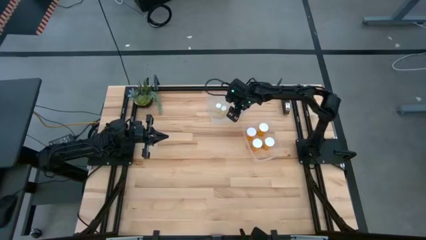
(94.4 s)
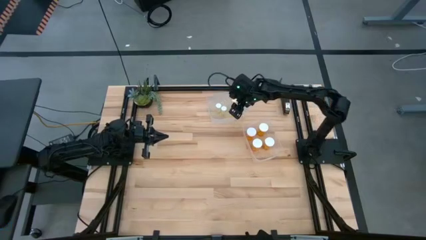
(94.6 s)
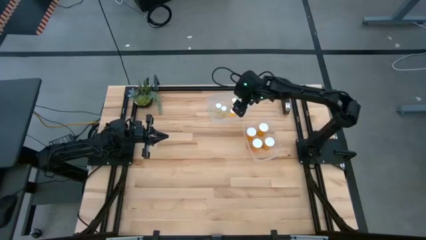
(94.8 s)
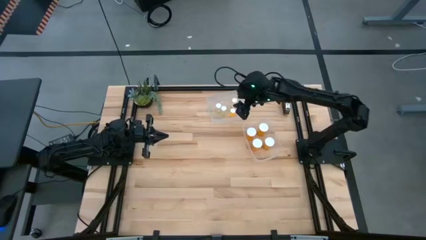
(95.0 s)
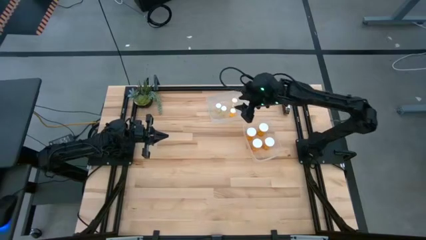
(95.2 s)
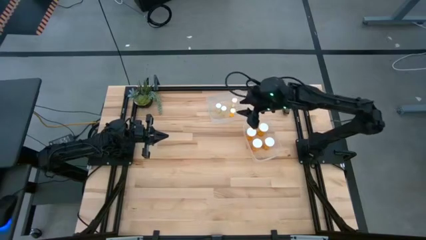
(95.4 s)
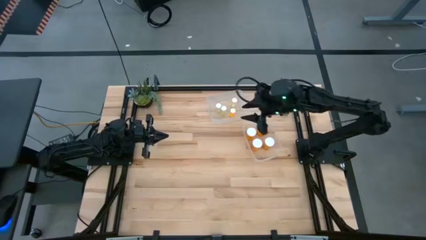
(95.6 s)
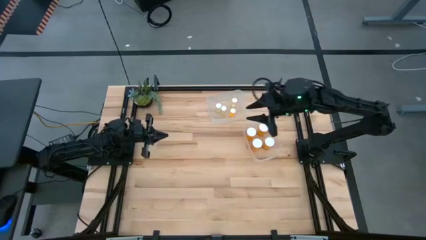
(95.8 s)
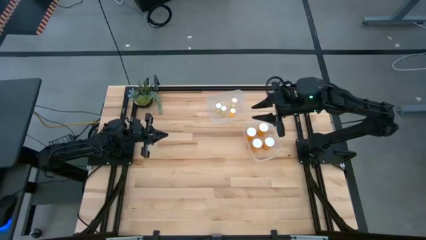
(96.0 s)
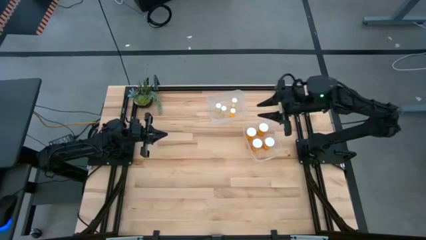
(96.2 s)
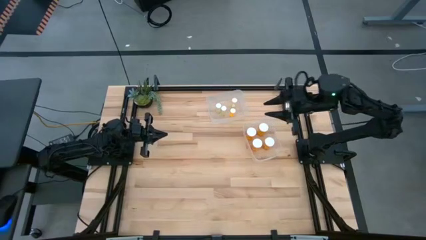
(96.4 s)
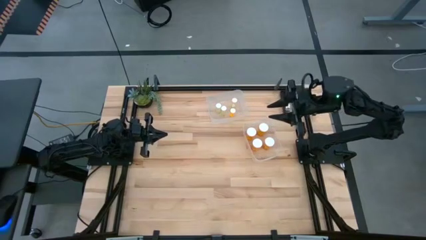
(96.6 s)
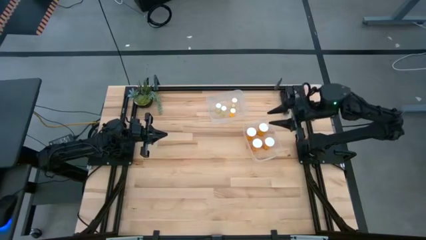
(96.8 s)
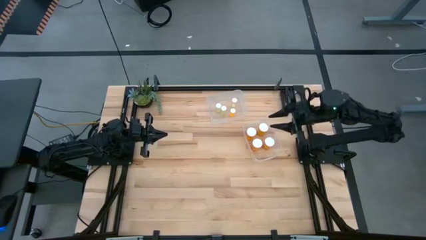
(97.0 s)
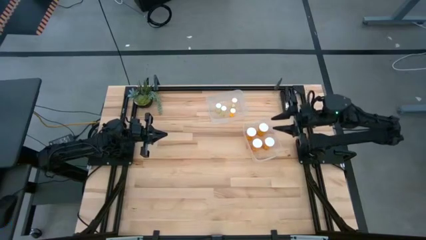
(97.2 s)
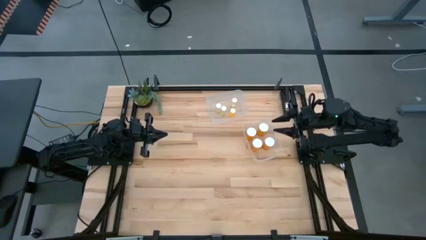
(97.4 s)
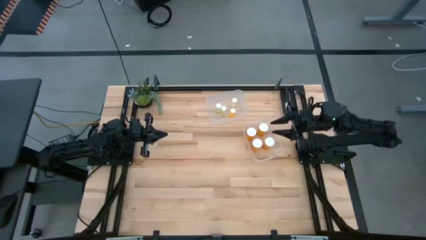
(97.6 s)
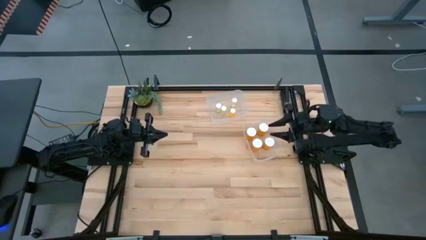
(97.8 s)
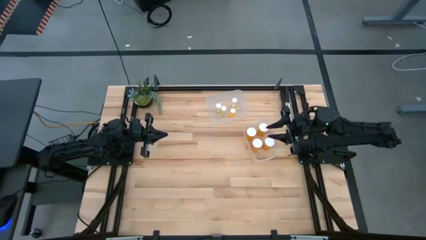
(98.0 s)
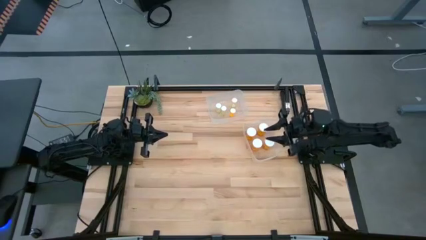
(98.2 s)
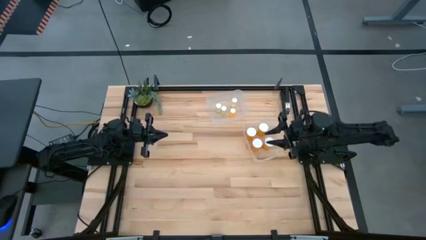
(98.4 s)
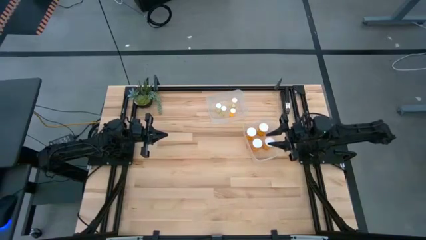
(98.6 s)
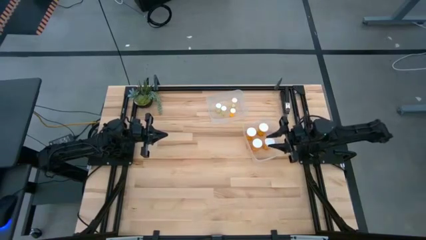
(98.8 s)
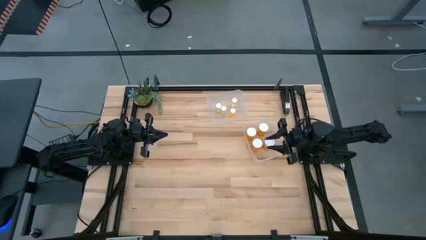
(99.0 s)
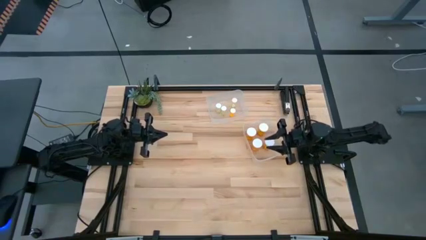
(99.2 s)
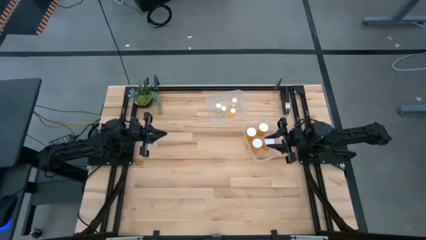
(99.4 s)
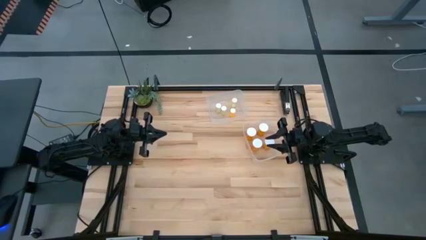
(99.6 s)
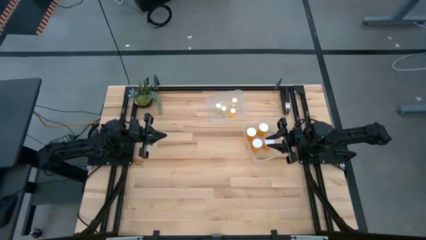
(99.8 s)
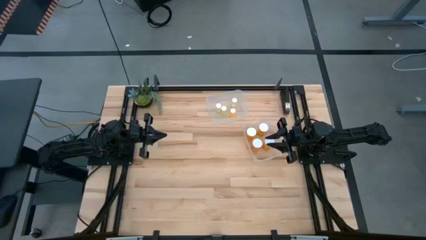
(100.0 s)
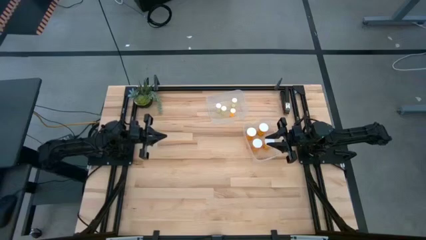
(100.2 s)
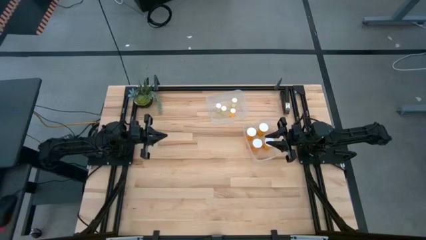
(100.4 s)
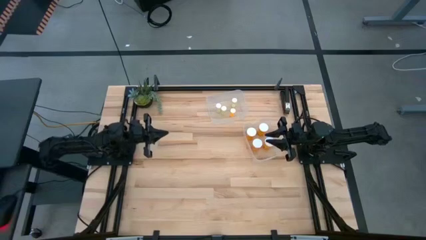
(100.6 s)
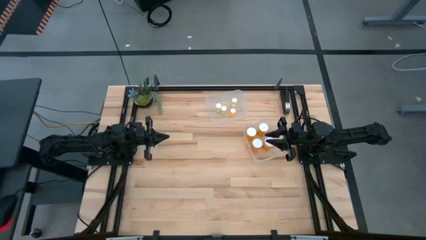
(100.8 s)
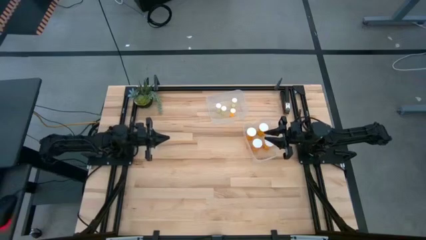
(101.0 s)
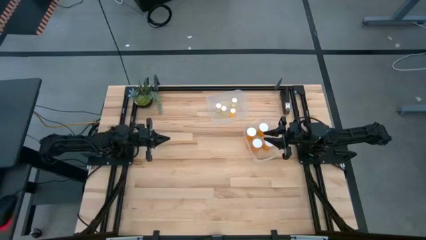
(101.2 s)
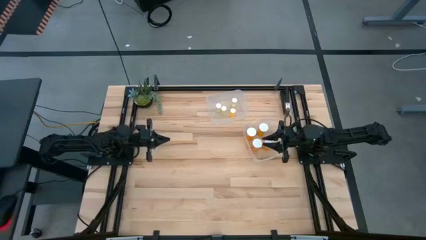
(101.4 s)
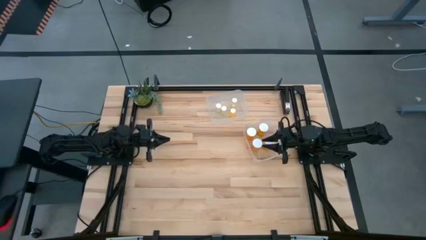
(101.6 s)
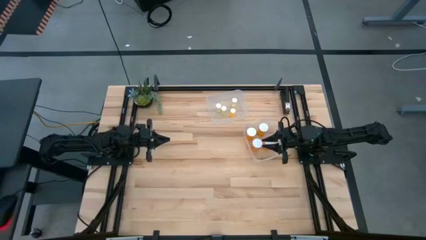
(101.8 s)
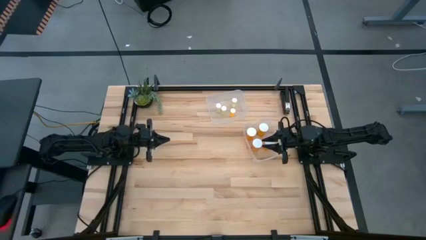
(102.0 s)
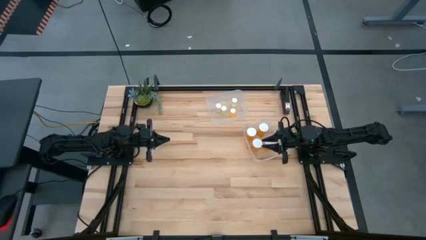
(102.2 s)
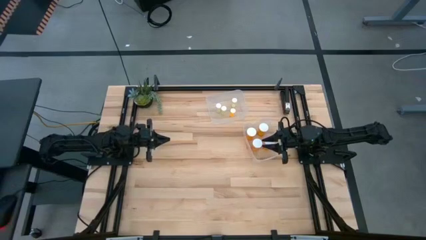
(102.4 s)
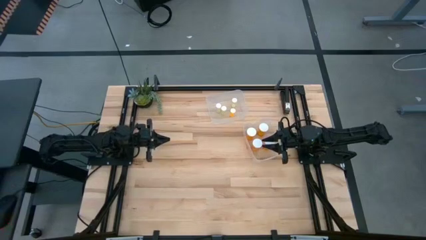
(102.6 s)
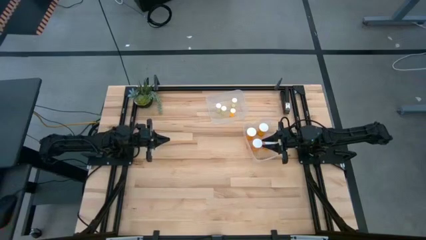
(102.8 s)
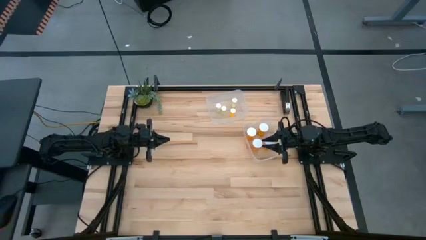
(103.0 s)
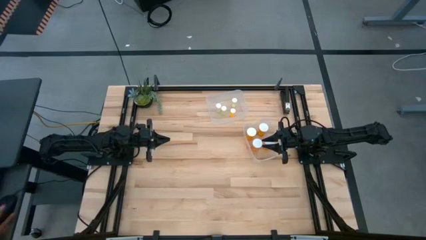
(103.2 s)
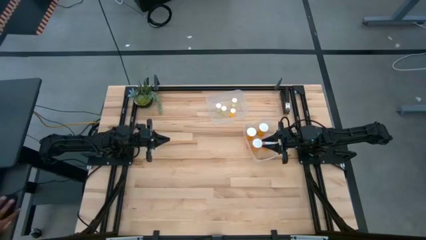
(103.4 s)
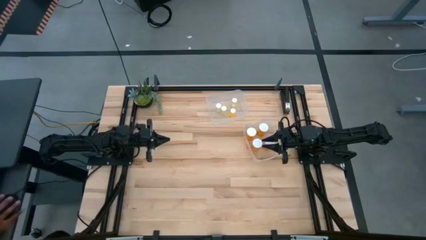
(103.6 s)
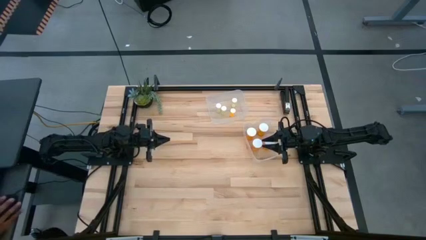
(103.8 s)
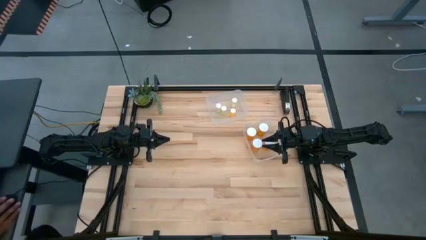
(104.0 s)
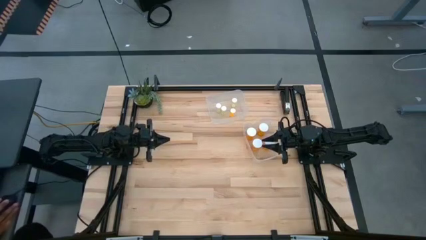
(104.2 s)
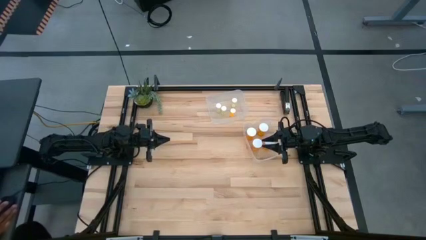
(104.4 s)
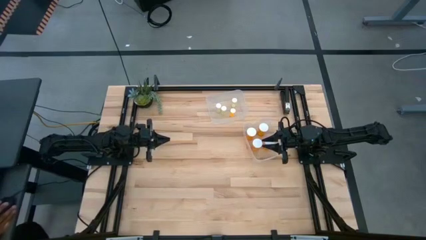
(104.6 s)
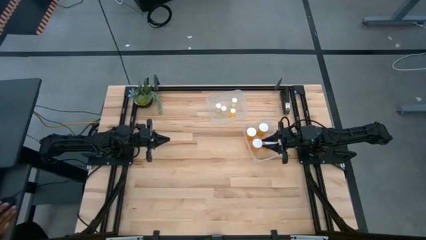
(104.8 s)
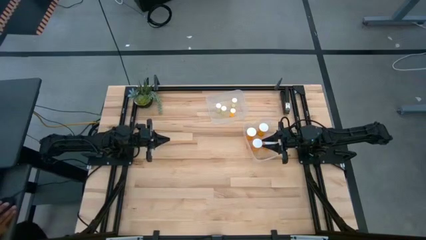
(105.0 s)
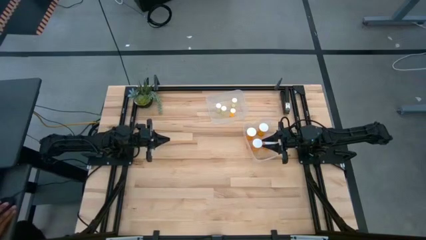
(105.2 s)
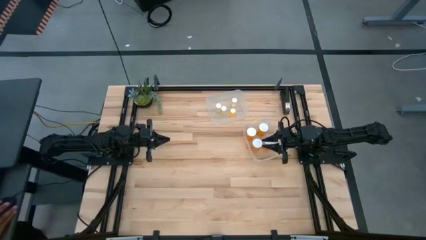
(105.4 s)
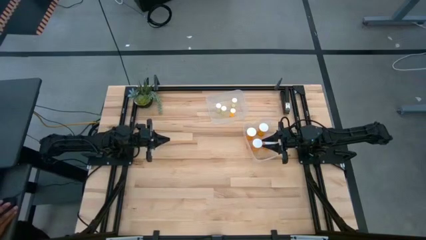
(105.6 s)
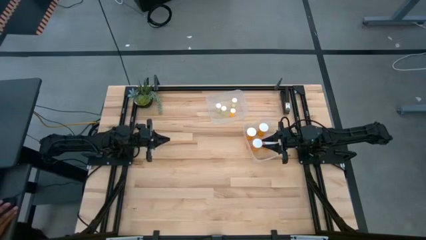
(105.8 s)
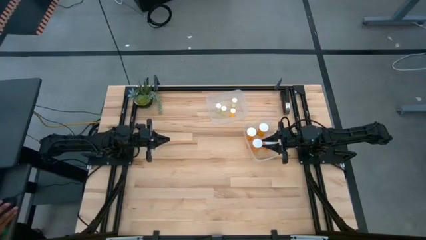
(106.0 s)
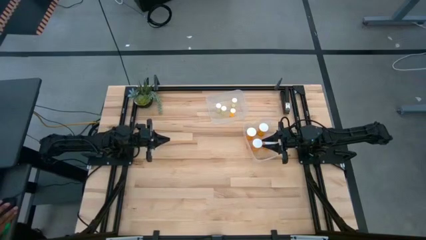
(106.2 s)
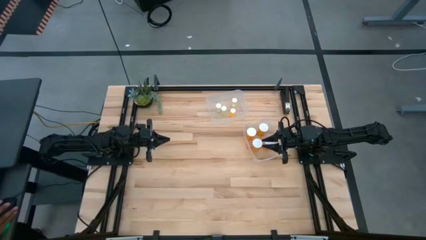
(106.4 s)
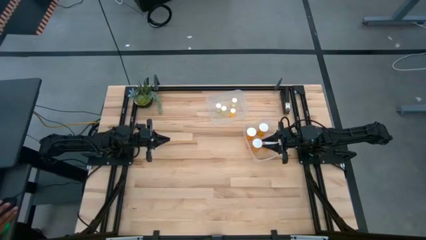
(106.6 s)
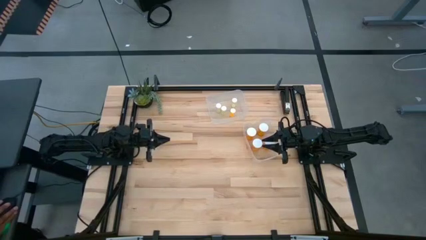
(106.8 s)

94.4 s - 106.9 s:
Task: Pick and place medicine bottles into bin by pill shape (circle, oval)
Return to Home Position

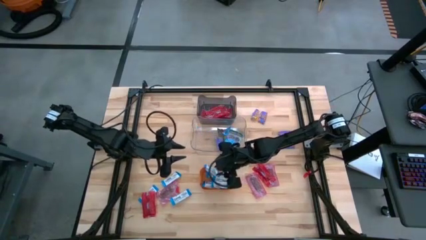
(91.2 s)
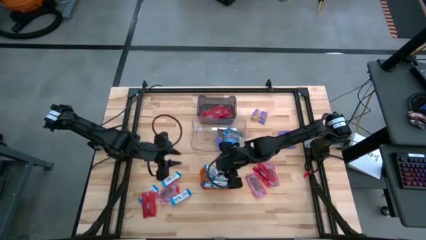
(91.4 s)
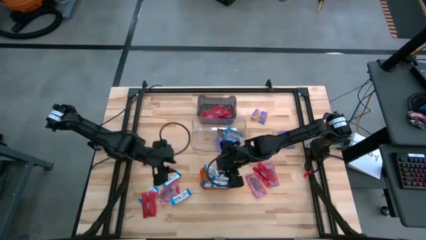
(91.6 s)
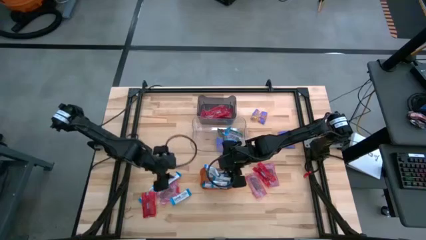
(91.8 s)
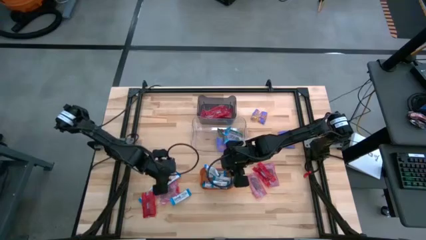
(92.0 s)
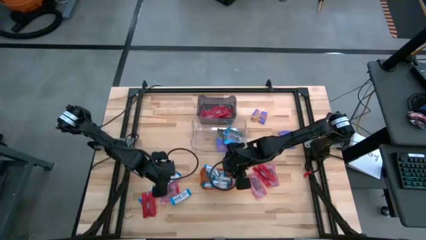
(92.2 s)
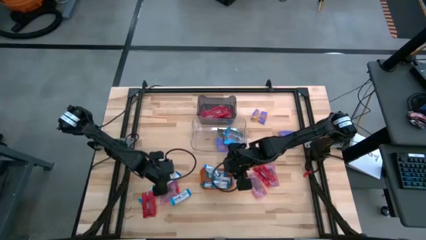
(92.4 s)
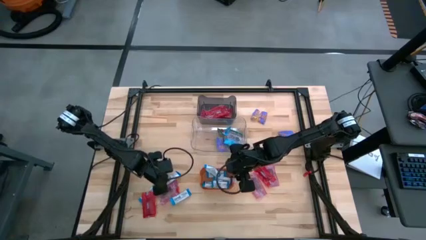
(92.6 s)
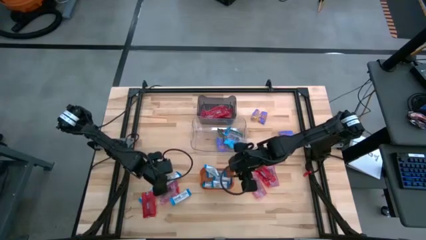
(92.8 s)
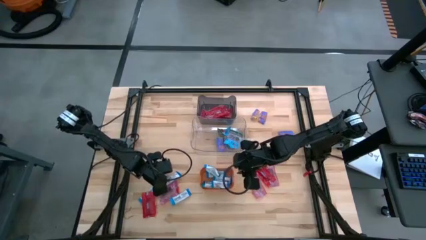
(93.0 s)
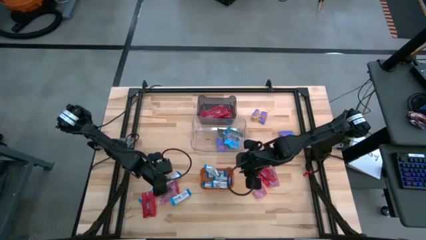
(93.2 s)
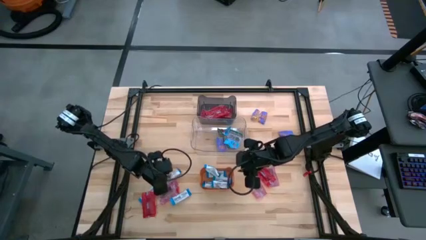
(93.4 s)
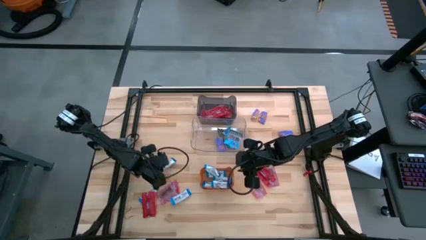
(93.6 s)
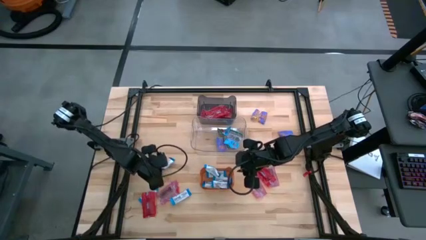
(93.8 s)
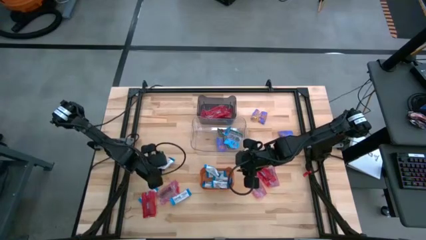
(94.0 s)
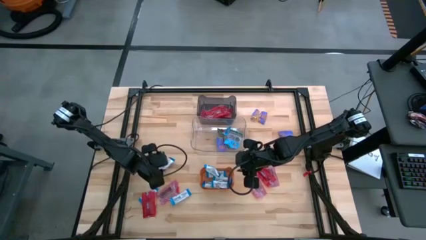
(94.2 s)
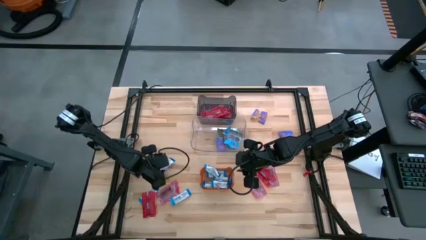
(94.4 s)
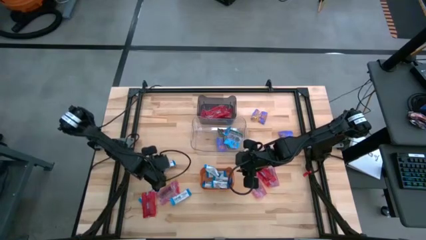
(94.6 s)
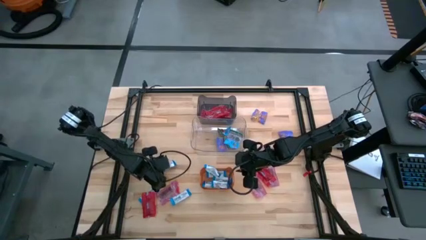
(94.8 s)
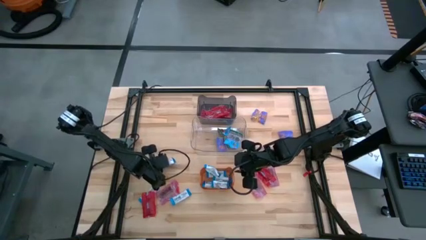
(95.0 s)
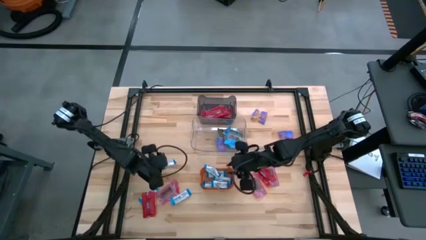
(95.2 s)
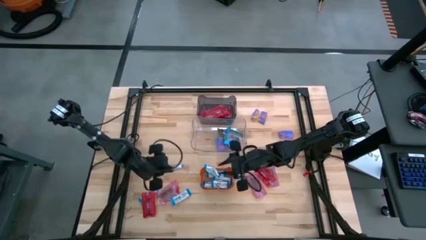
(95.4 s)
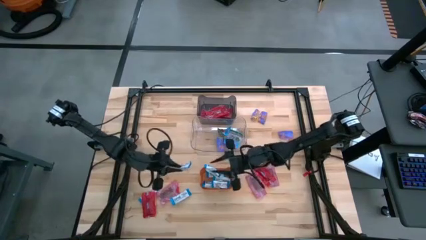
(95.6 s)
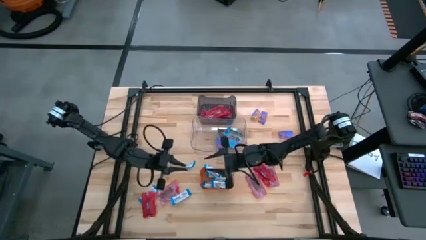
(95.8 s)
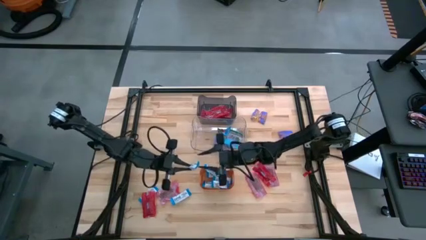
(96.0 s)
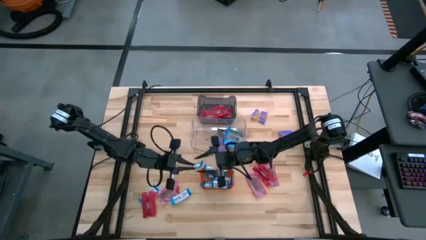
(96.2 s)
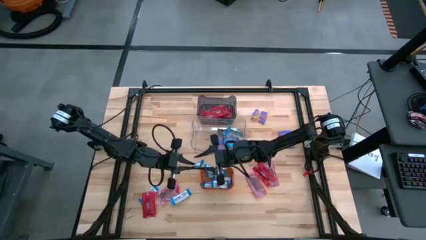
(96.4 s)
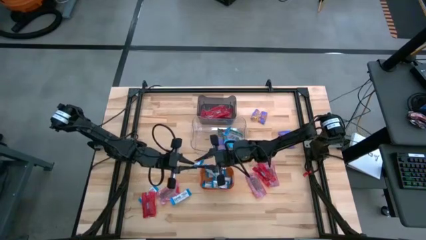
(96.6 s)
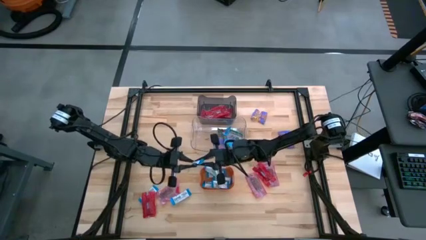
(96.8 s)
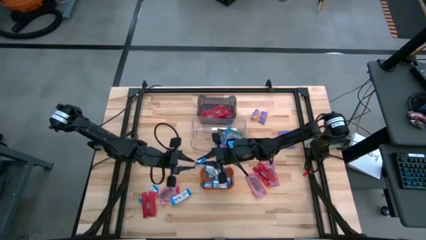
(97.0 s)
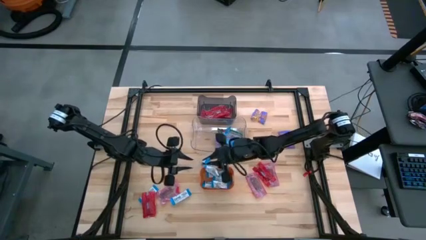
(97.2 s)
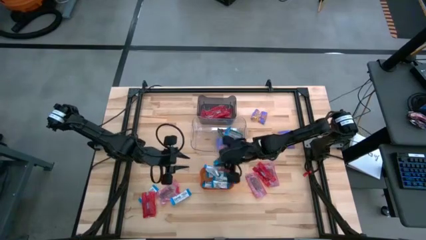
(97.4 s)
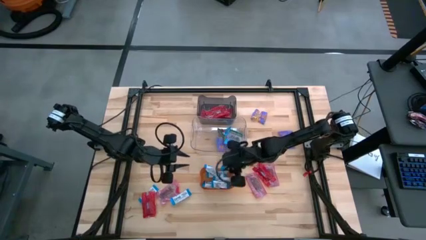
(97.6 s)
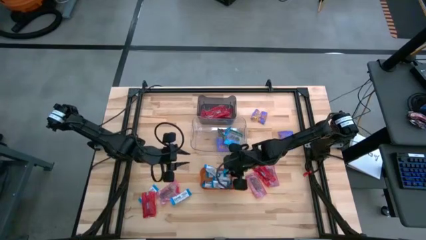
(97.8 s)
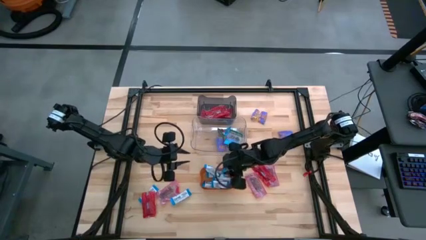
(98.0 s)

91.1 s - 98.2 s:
Task: Sort candy
Put the top white chocolate bar into the orange bin
